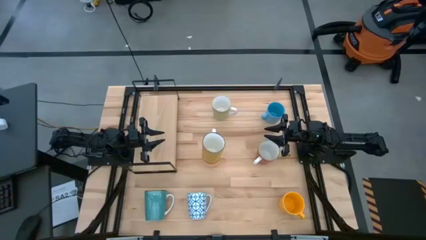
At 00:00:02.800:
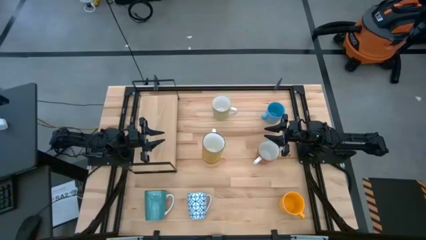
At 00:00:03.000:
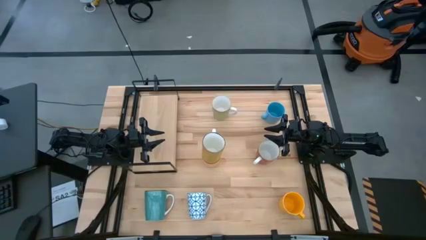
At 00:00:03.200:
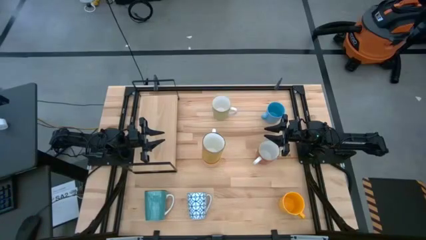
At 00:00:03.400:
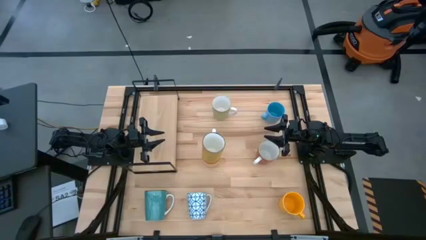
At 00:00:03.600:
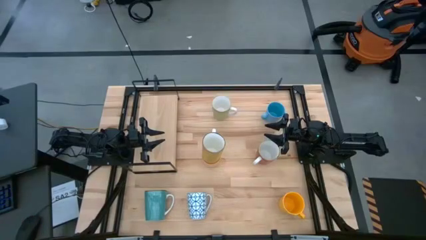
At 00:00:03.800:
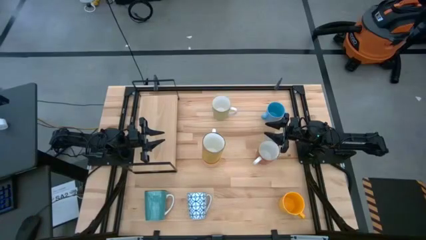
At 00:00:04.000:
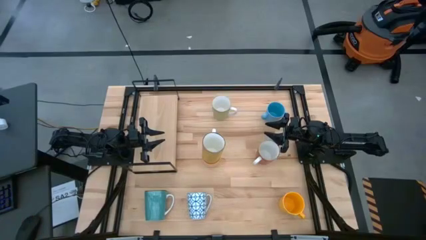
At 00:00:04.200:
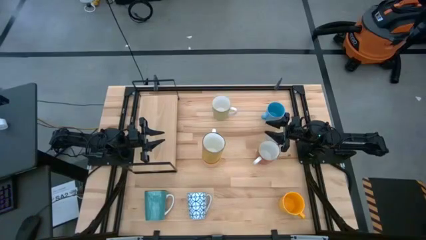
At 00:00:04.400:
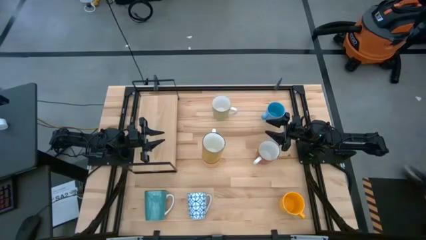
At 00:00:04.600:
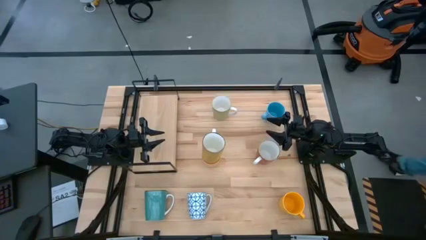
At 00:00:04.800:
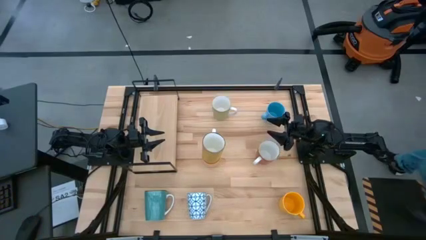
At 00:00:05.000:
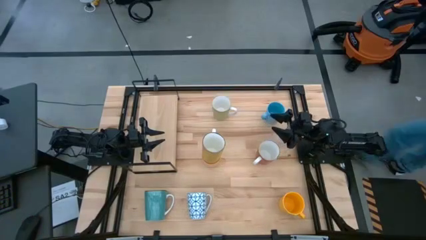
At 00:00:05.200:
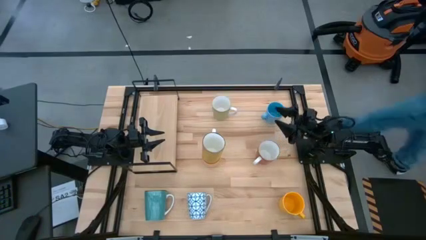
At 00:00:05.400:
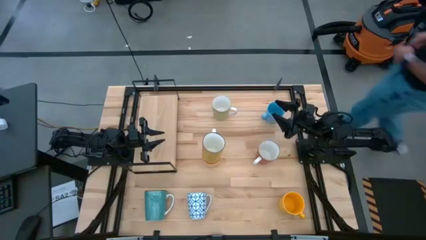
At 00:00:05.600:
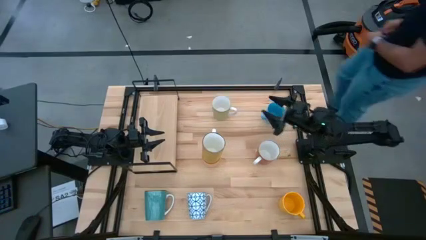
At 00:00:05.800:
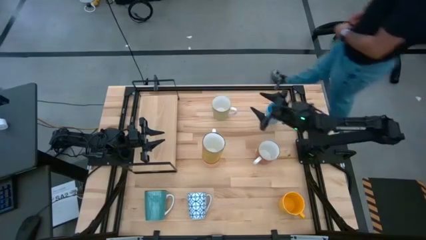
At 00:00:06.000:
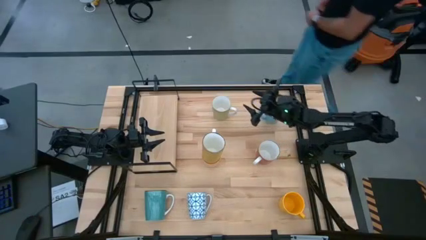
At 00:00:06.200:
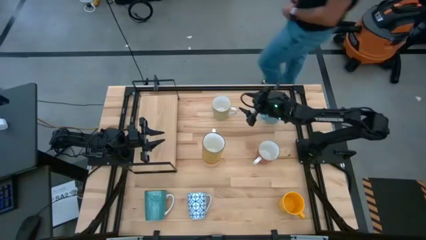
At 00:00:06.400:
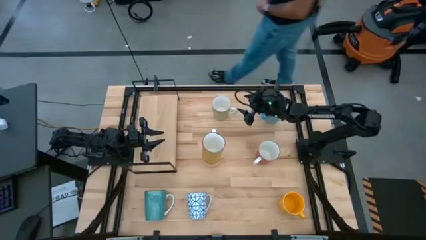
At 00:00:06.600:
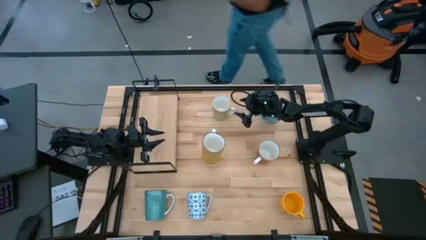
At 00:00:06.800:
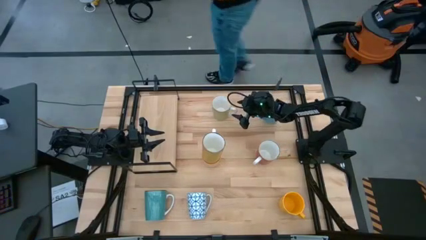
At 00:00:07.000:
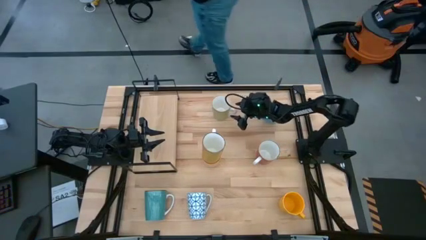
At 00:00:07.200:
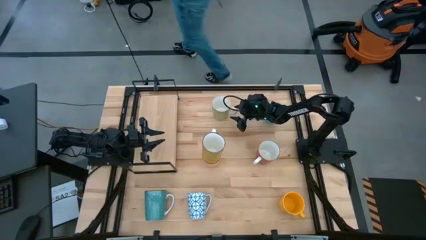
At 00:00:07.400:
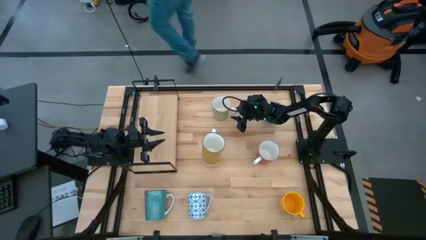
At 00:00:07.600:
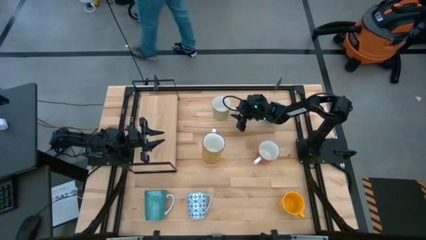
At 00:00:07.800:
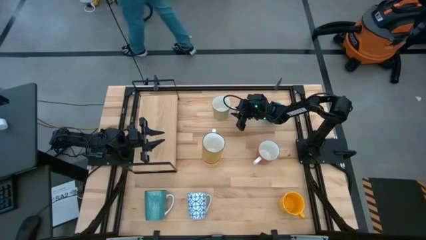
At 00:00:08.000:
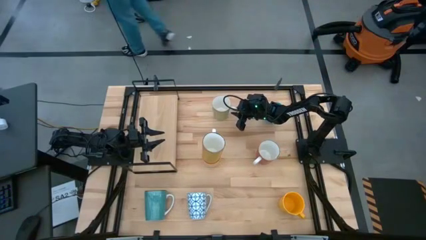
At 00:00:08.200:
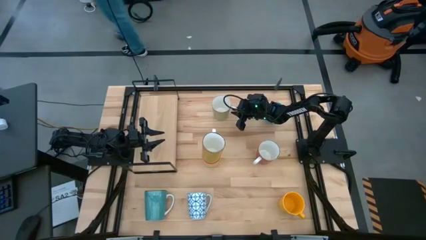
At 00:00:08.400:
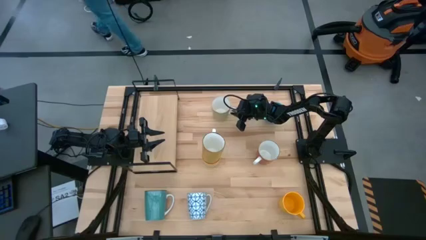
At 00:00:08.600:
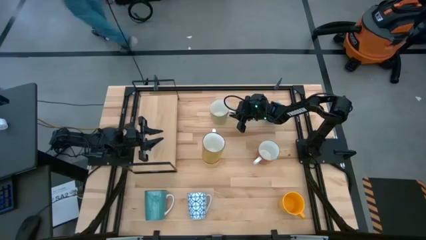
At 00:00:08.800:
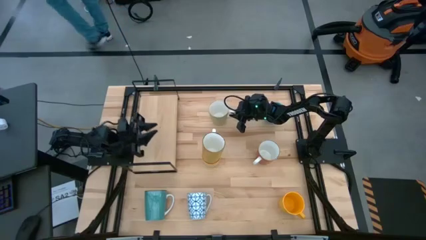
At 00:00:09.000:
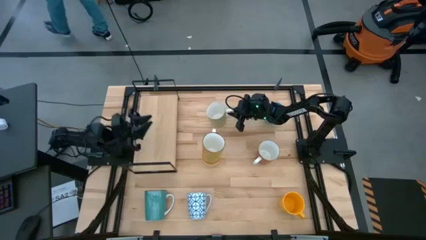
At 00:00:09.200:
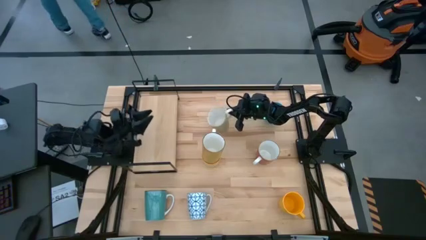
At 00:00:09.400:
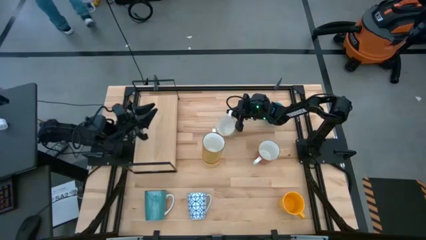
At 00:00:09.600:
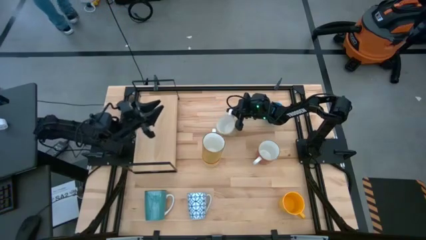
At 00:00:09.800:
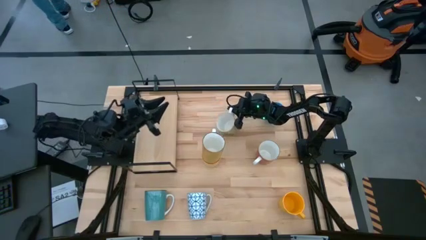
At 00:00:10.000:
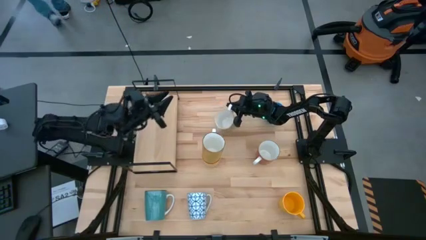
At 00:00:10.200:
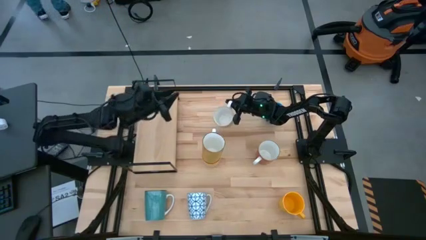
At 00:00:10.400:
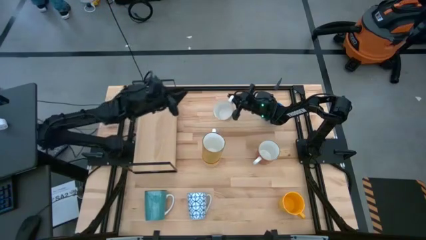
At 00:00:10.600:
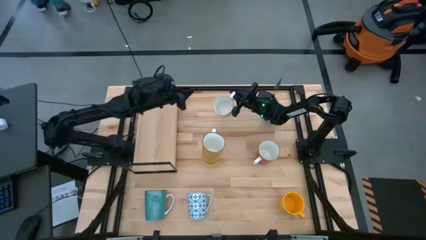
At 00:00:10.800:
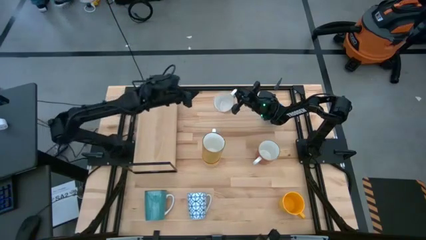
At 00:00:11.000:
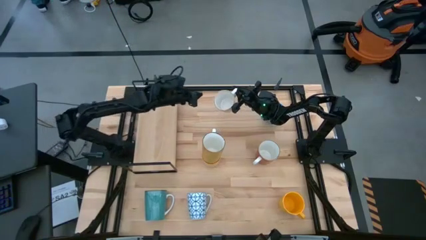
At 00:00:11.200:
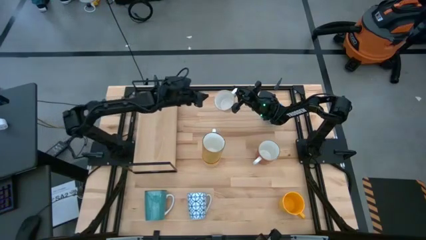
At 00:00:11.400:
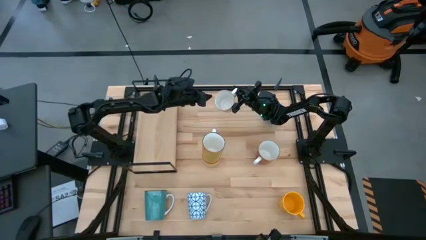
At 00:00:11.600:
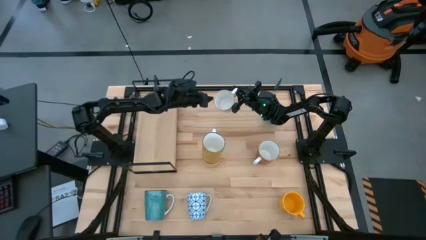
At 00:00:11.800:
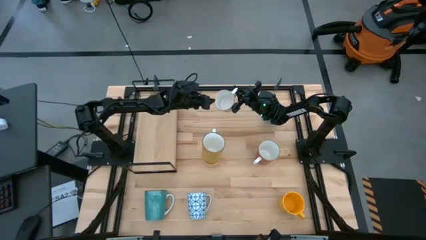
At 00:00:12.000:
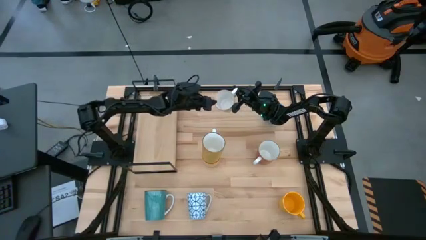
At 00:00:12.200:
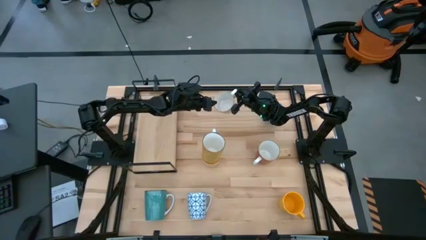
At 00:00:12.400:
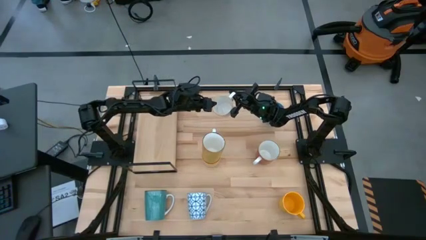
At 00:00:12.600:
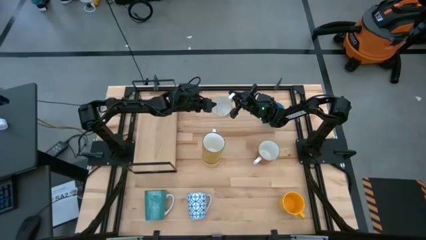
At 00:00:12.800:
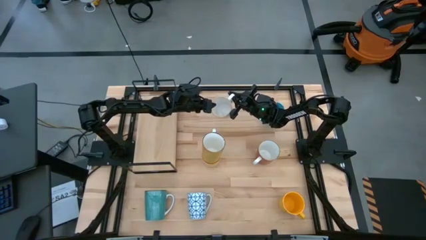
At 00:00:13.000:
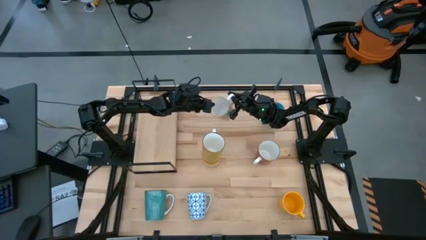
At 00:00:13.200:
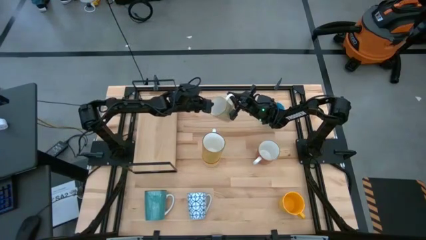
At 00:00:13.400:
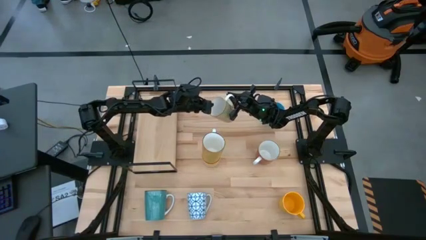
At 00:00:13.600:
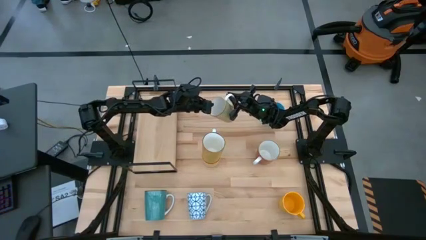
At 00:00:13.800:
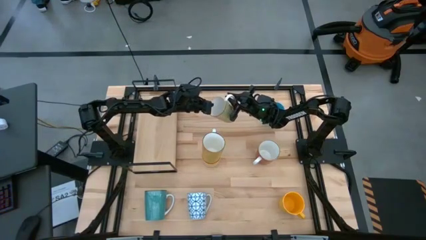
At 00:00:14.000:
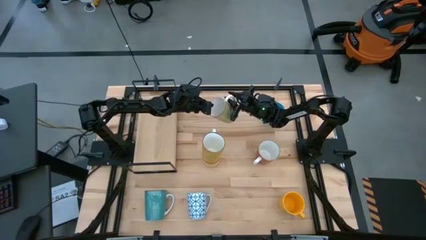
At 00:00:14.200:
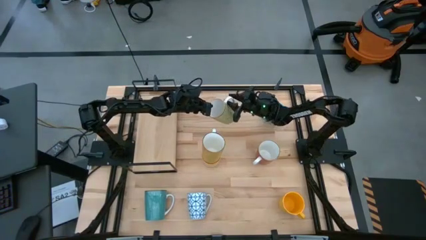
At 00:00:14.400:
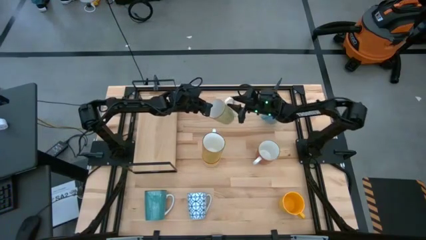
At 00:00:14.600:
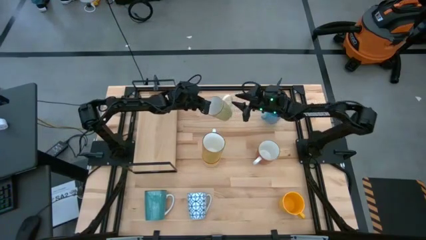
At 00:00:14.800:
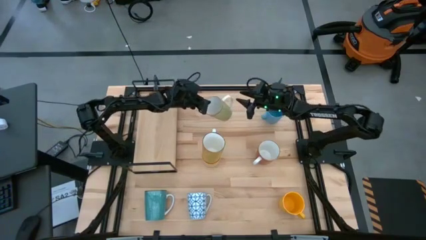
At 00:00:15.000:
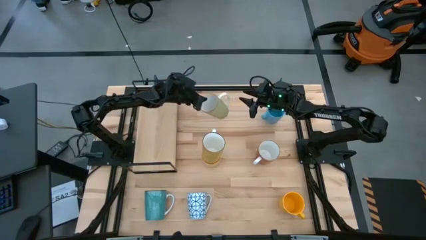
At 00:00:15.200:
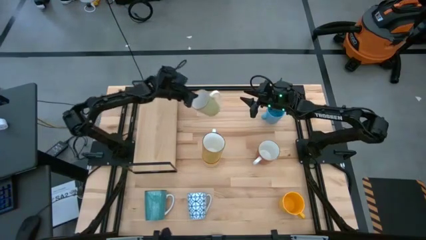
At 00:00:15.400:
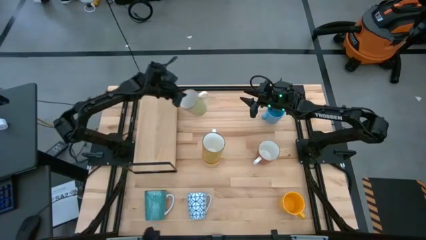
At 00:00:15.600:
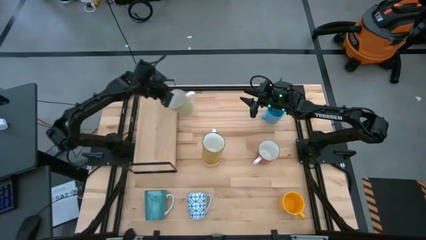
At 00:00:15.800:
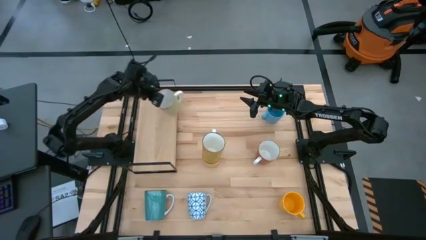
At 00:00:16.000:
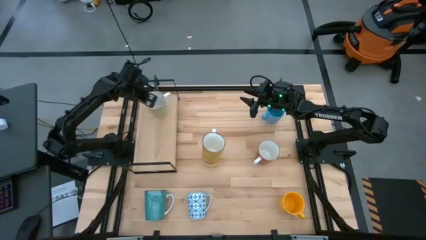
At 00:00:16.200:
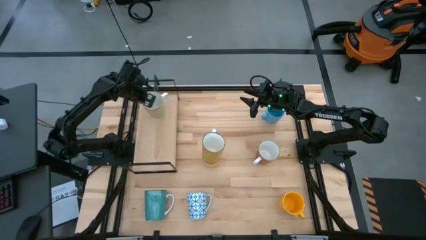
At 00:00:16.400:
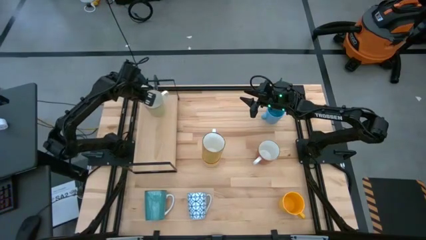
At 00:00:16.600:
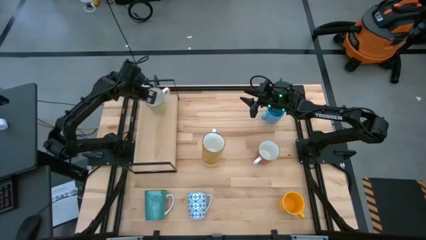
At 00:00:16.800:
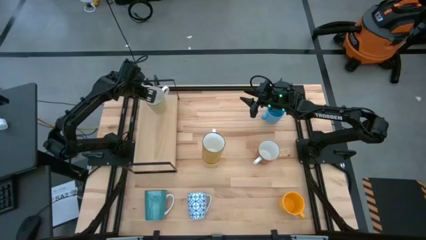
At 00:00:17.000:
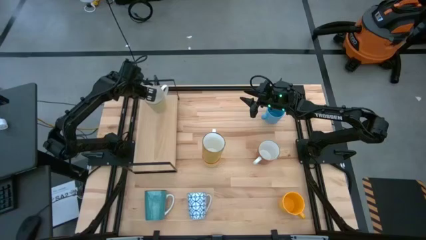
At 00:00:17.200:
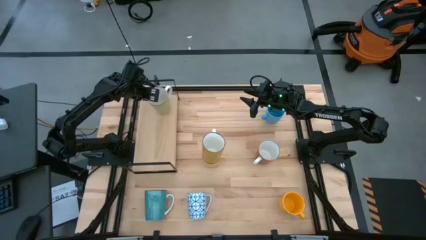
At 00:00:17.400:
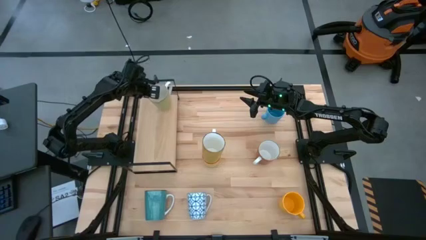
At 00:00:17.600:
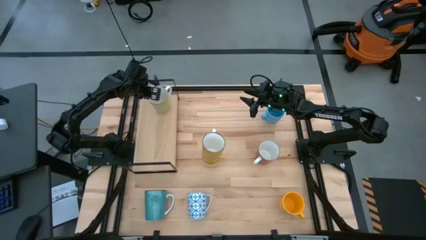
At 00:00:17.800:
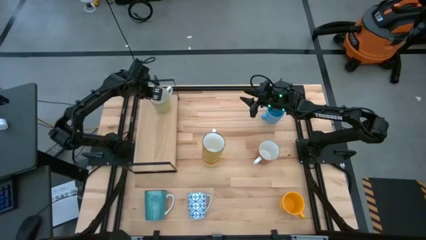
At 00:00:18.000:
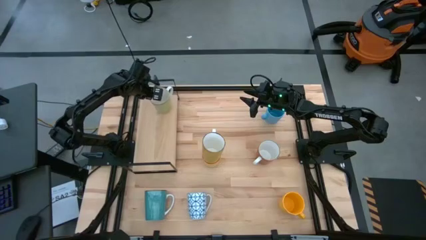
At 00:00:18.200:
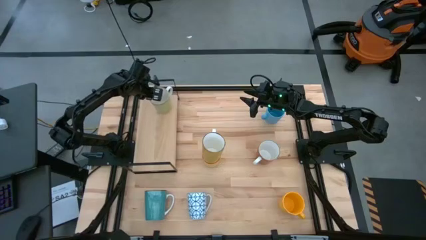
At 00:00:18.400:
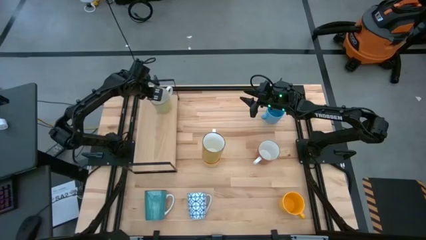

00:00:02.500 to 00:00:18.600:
Task: Place coffee mugs
Put the light green mug on the shelf
